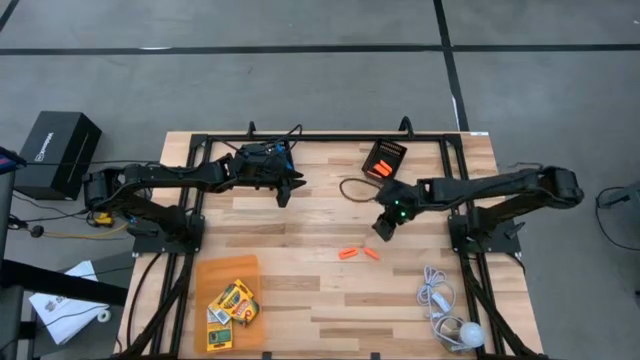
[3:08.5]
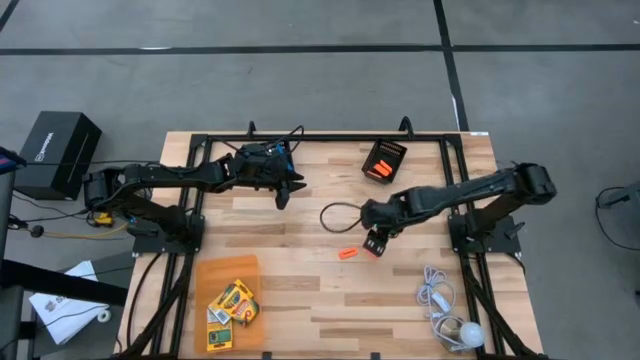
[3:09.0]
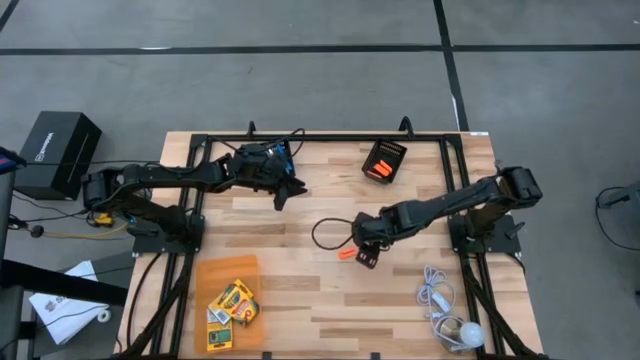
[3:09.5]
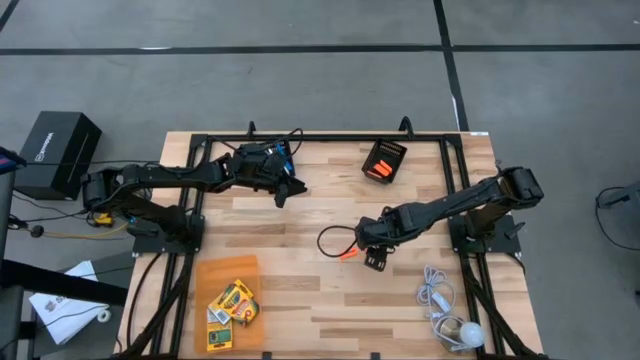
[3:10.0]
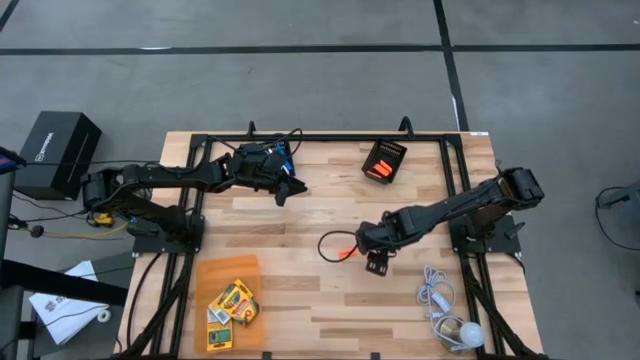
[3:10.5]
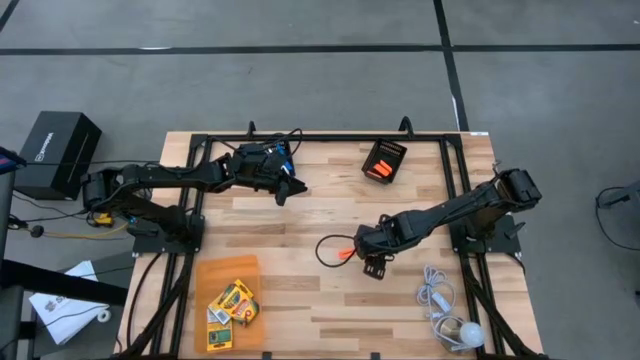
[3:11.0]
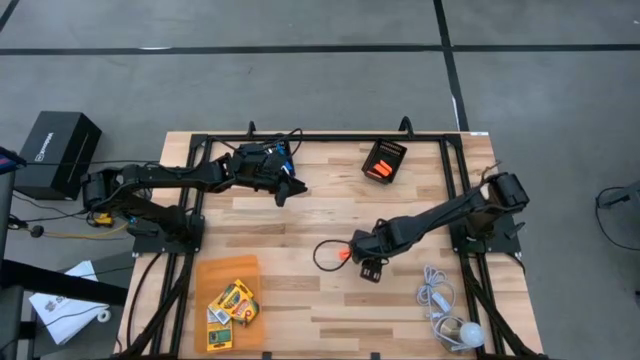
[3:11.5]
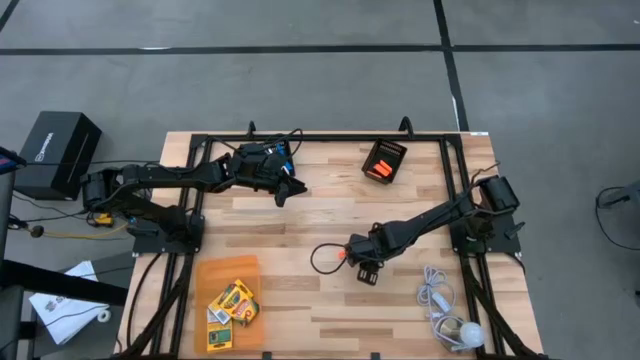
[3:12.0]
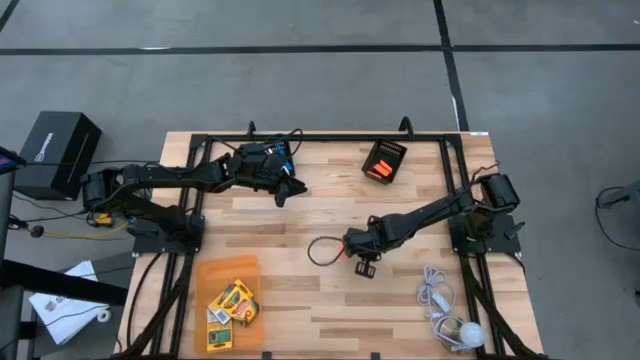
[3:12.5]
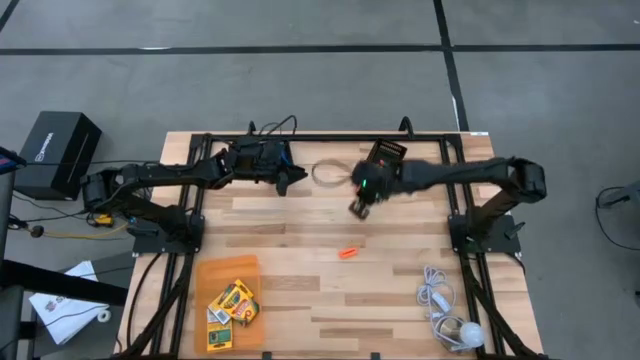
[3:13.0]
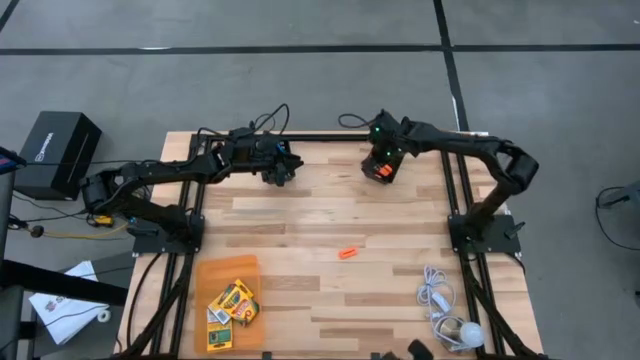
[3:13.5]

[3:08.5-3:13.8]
Task: Pick & Place School Supplies
Put the orange eraser into the right black bin

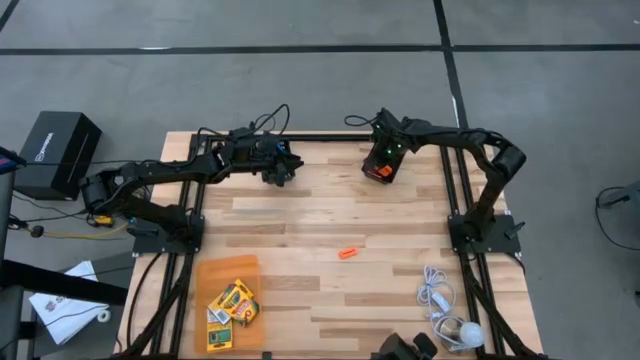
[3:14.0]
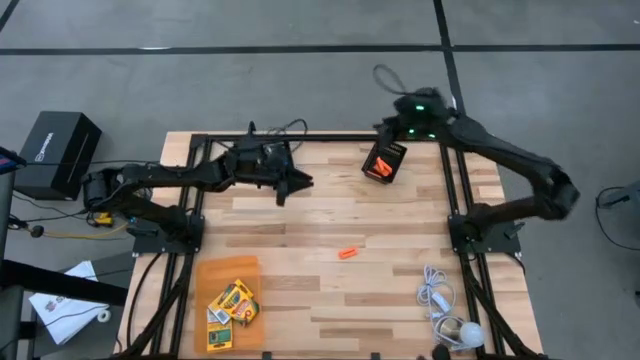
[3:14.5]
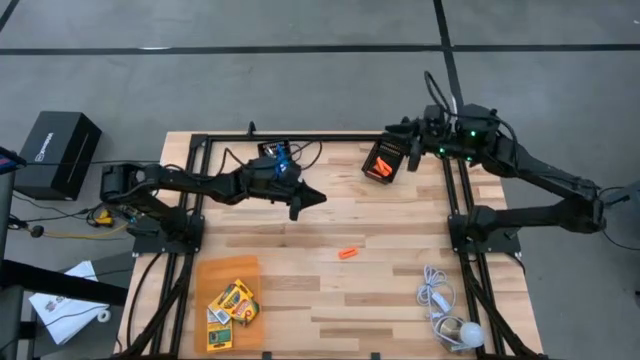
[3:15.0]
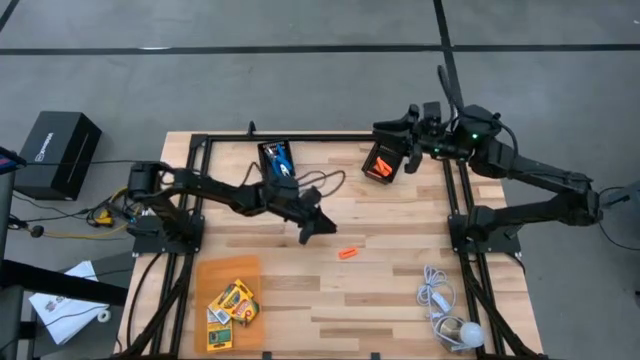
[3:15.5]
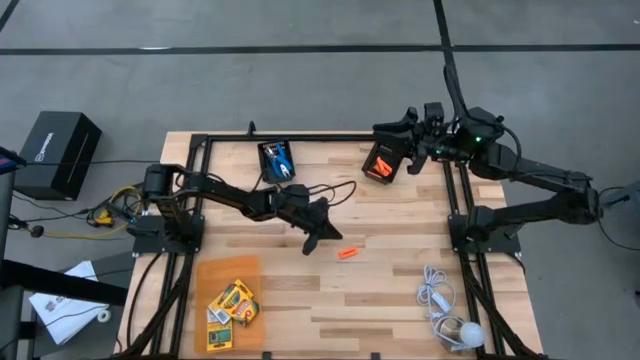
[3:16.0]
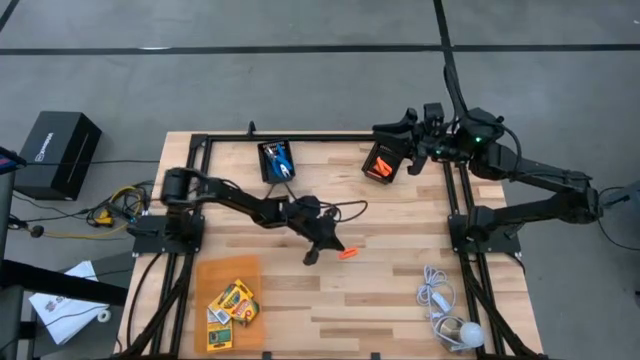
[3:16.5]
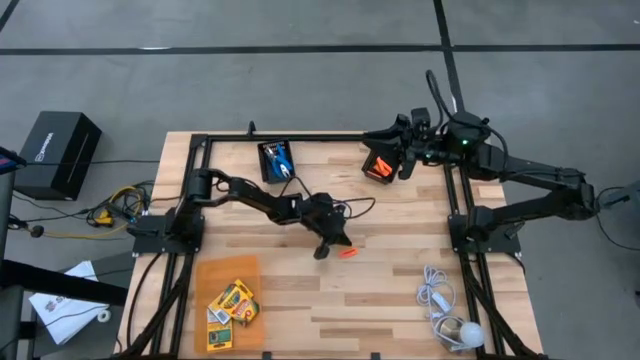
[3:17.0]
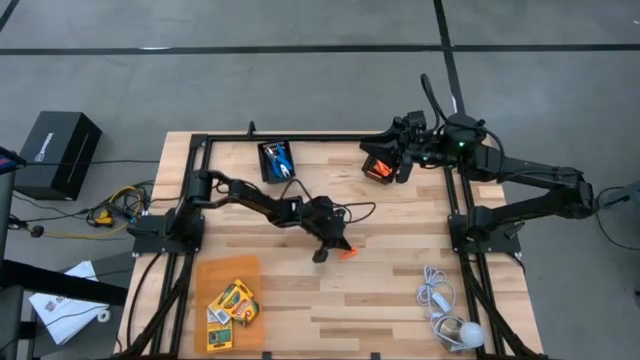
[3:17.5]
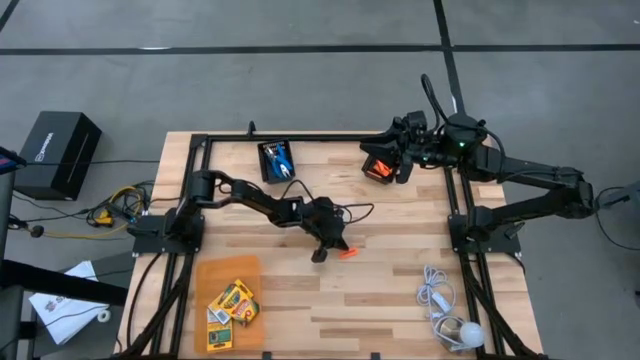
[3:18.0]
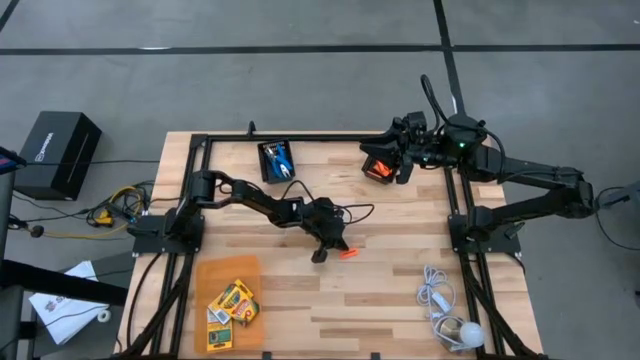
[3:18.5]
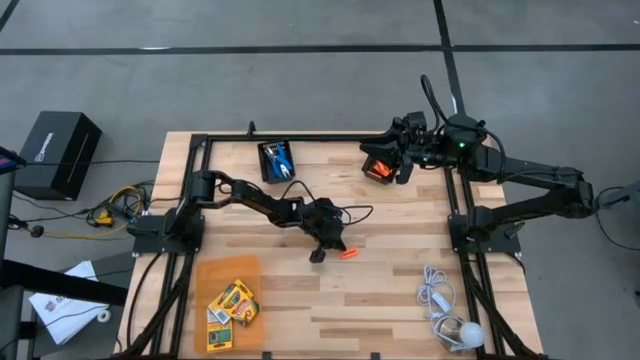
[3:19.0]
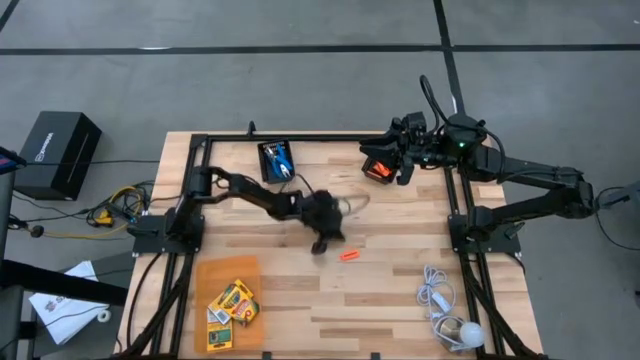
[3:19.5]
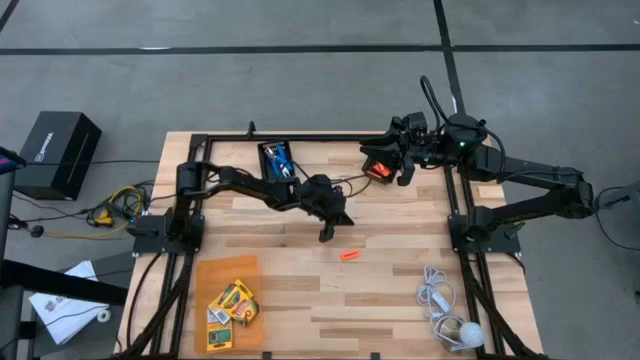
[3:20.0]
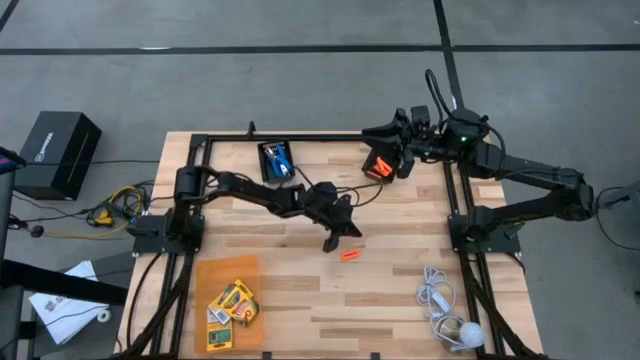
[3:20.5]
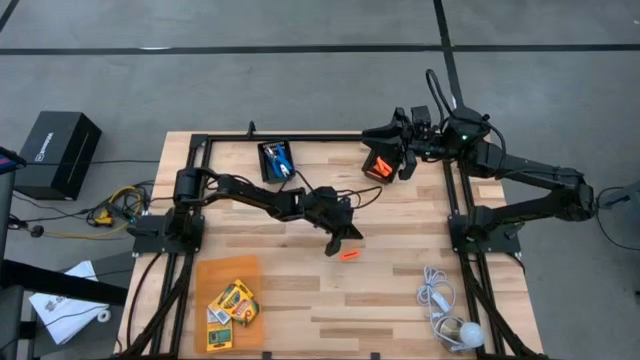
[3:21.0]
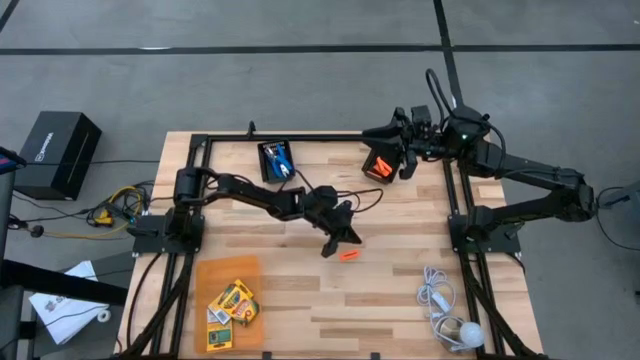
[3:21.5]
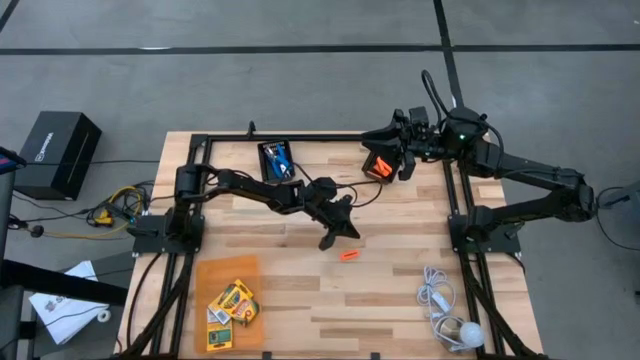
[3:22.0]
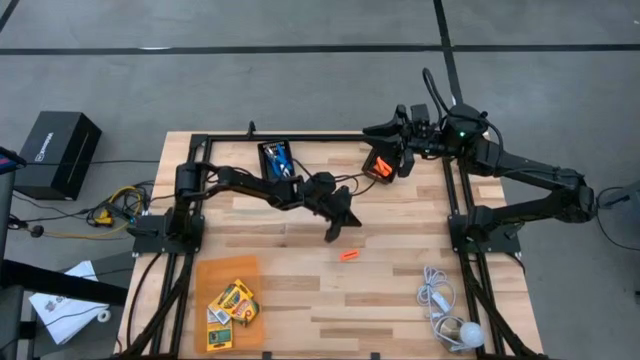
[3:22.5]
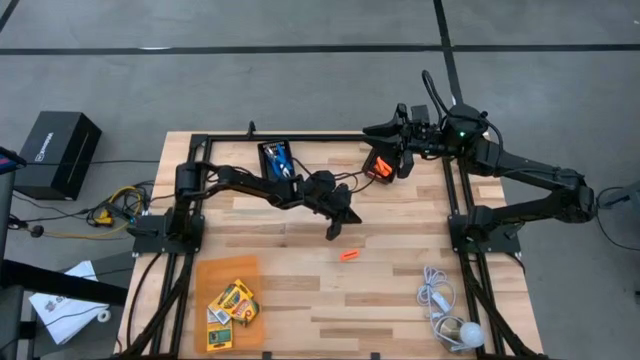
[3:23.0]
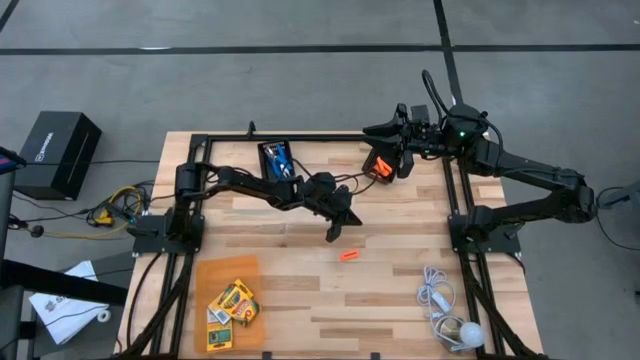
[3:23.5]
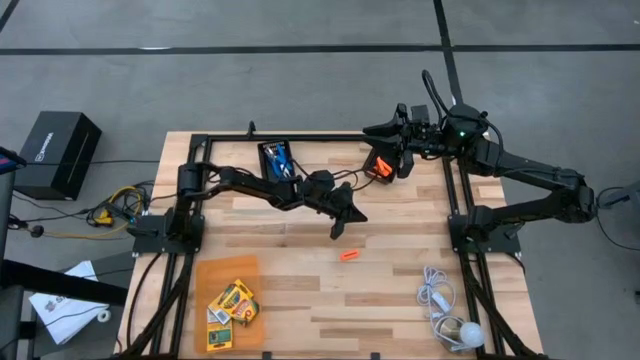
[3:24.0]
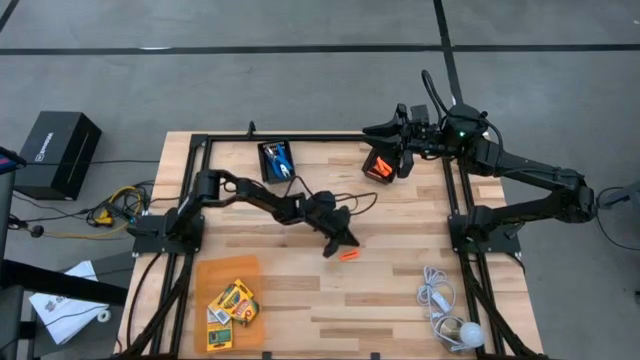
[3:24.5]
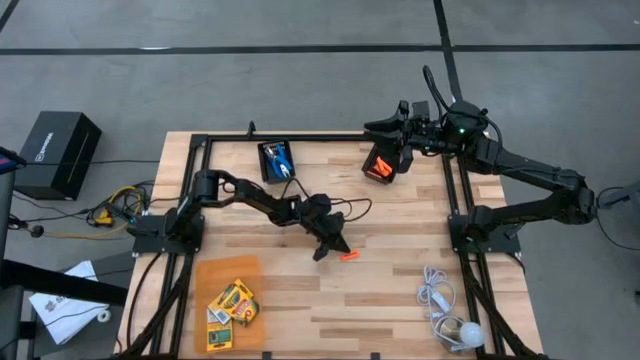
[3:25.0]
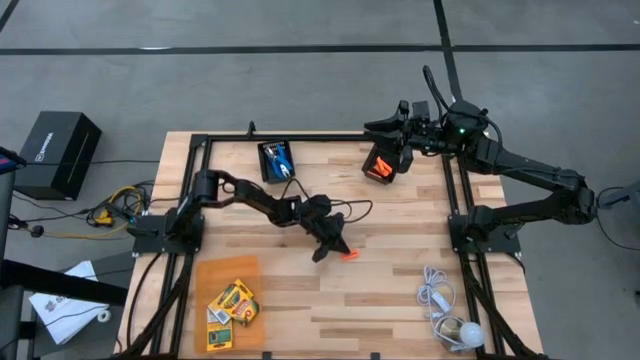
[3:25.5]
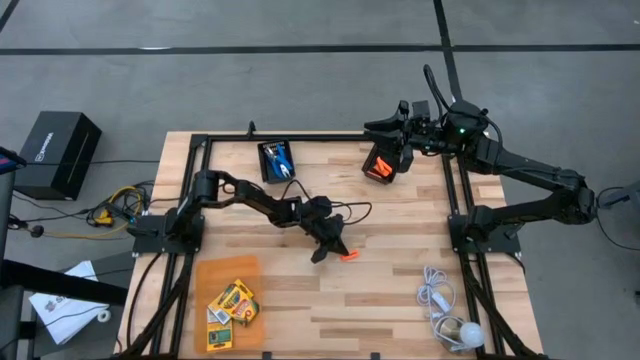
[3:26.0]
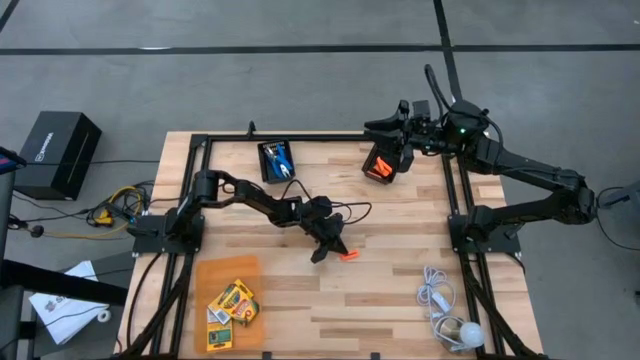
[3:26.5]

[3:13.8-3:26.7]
Put the orange eraser into the right black bin

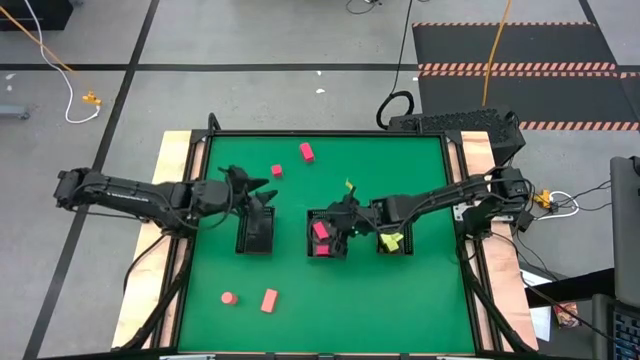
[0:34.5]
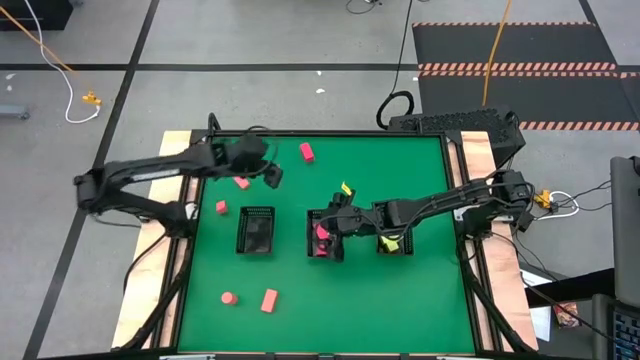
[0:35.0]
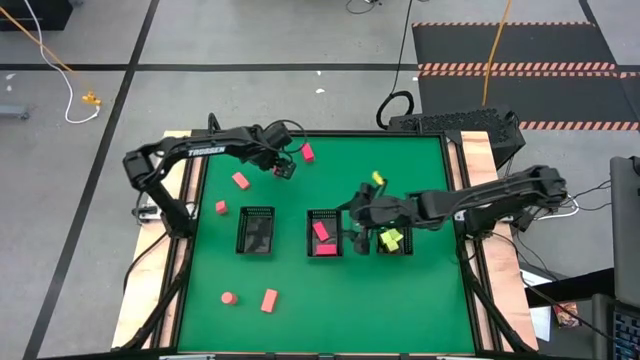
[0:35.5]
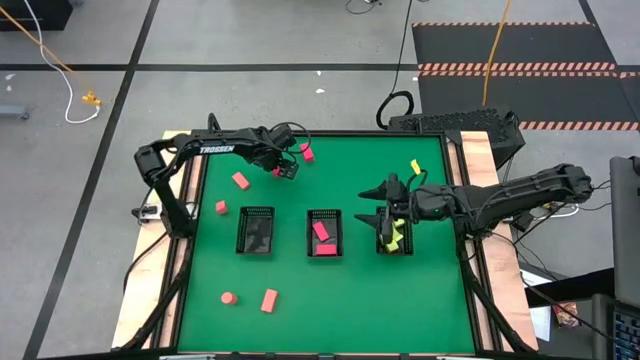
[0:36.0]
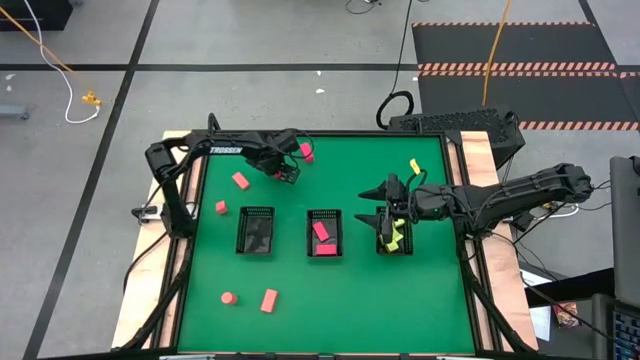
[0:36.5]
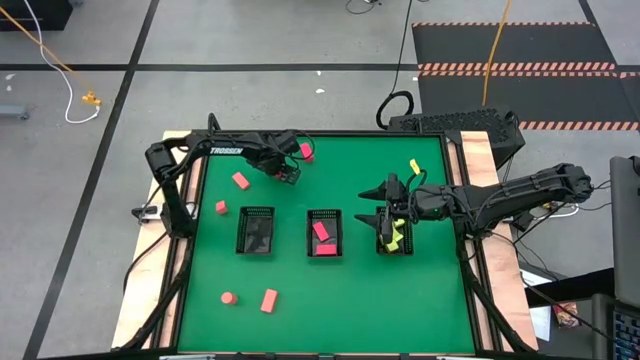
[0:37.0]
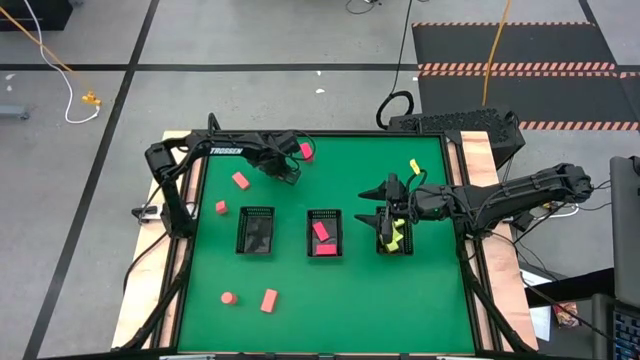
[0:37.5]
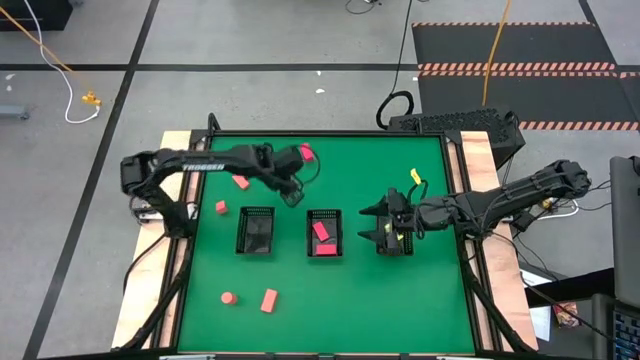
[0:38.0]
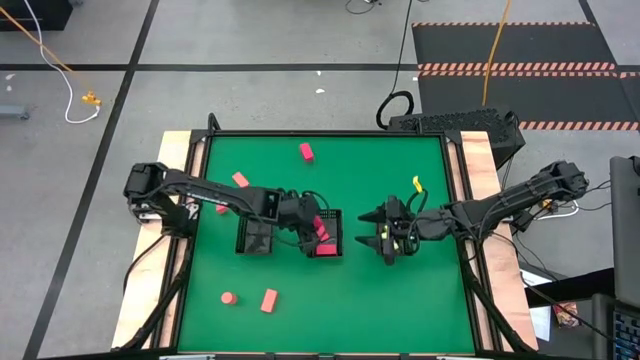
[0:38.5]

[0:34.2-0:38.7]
Task: Sort & place blocks by color
Put the red block into the middle black basket
